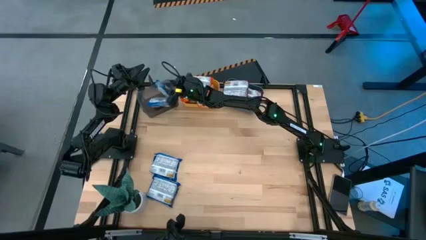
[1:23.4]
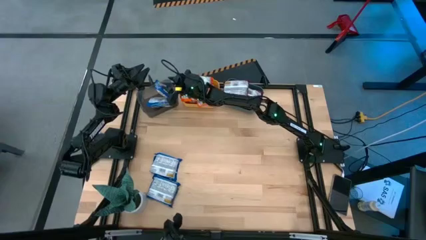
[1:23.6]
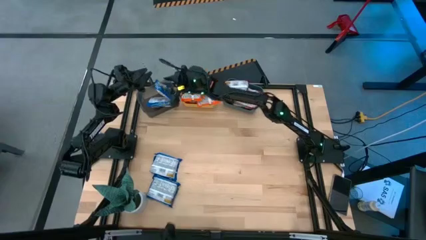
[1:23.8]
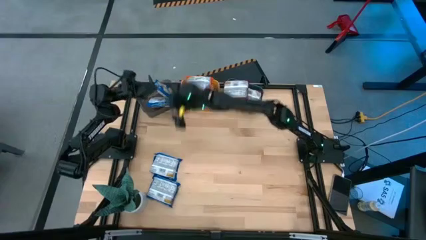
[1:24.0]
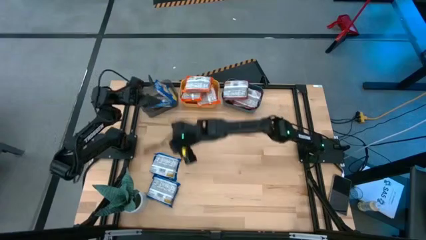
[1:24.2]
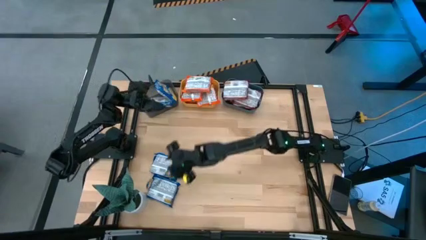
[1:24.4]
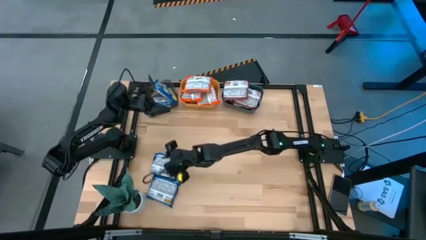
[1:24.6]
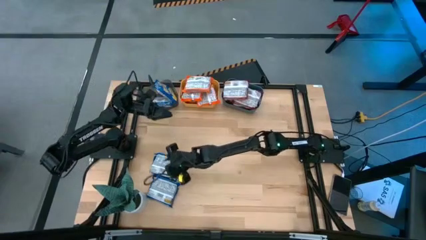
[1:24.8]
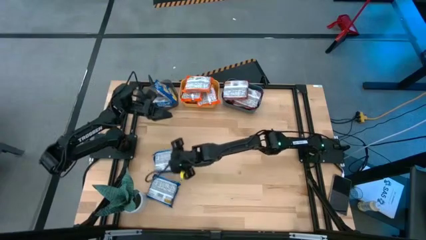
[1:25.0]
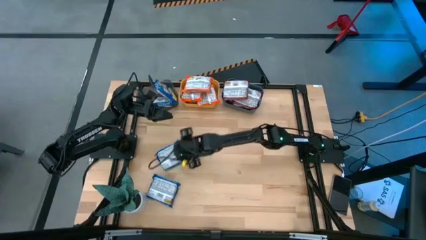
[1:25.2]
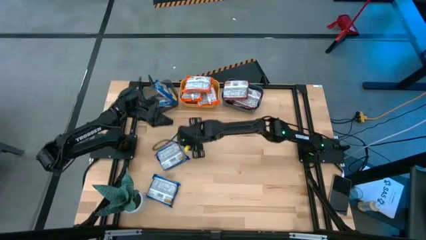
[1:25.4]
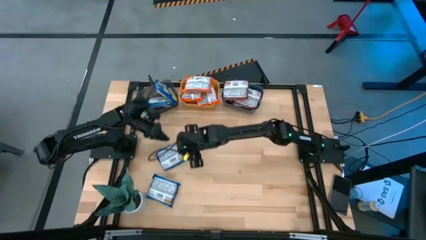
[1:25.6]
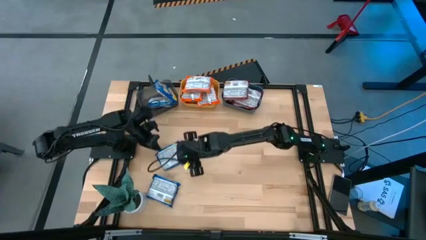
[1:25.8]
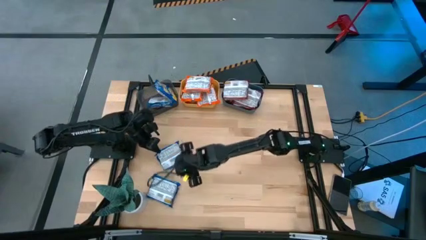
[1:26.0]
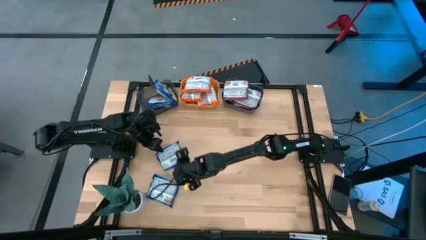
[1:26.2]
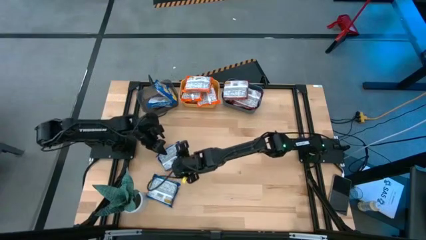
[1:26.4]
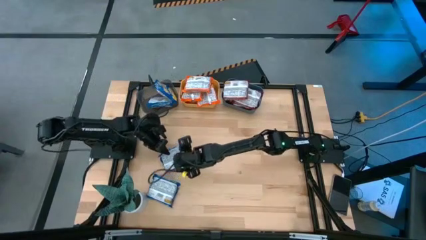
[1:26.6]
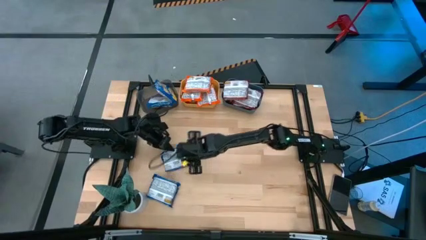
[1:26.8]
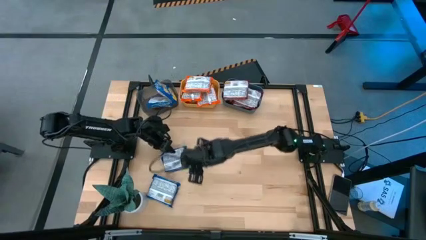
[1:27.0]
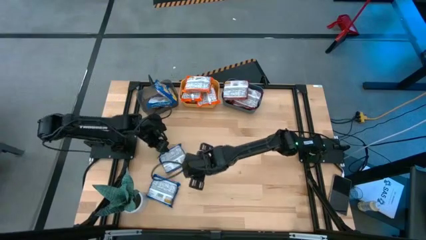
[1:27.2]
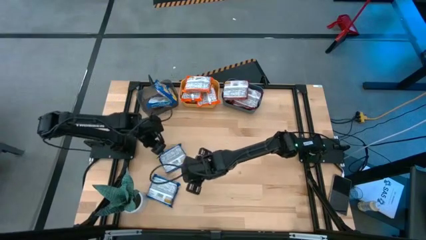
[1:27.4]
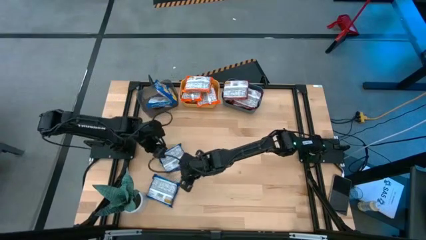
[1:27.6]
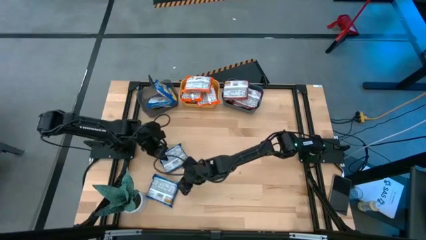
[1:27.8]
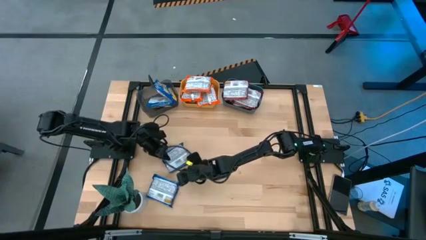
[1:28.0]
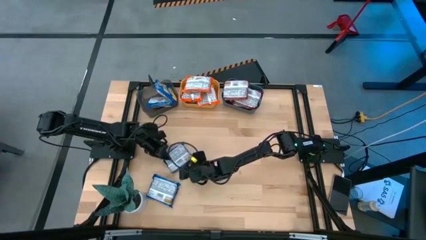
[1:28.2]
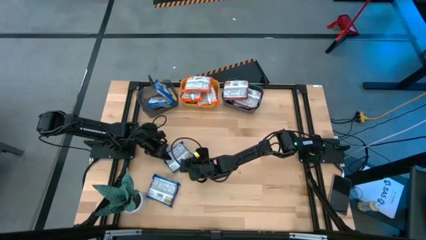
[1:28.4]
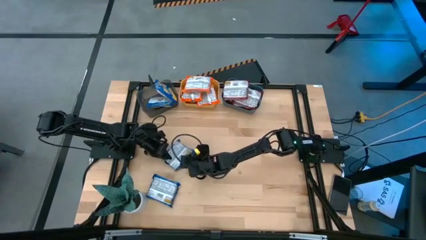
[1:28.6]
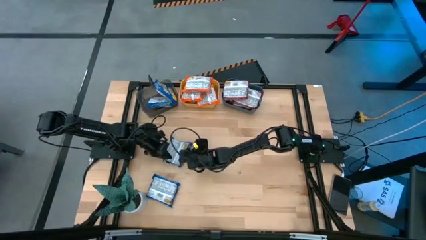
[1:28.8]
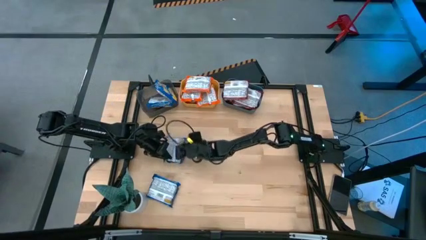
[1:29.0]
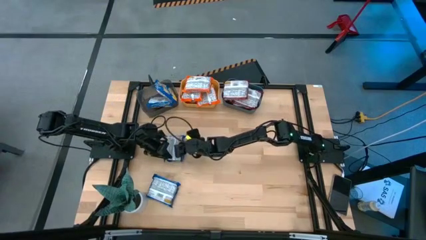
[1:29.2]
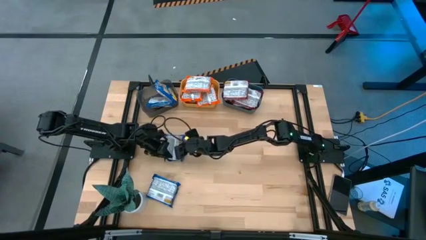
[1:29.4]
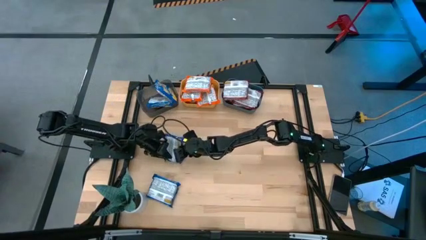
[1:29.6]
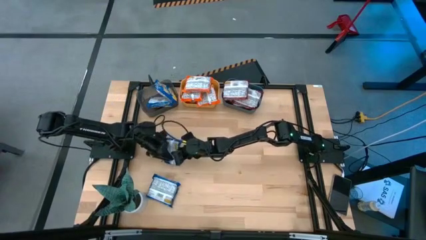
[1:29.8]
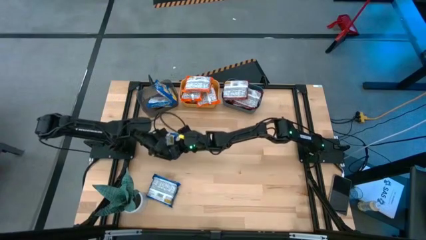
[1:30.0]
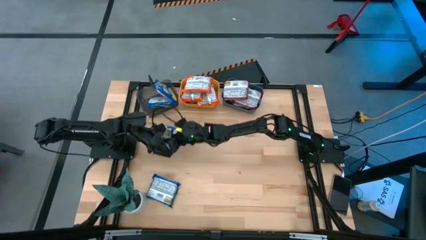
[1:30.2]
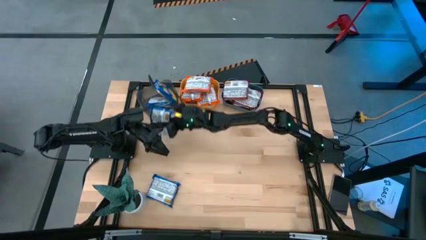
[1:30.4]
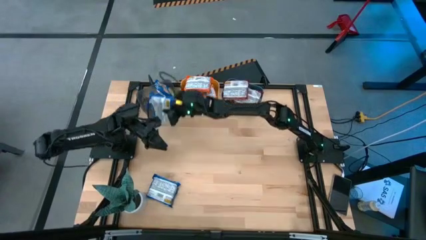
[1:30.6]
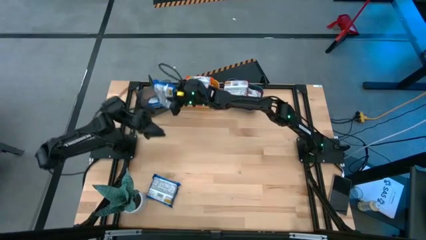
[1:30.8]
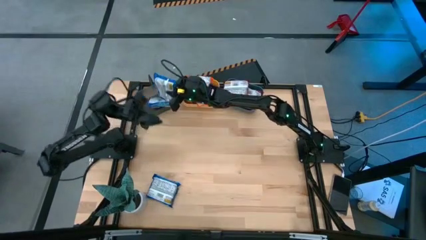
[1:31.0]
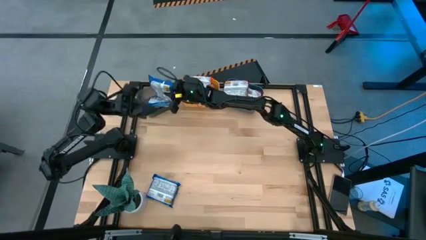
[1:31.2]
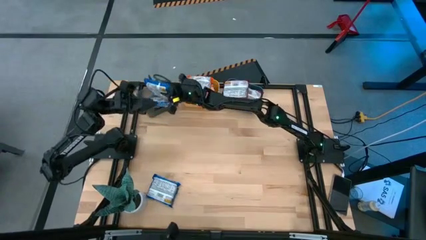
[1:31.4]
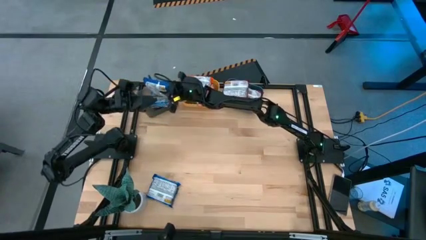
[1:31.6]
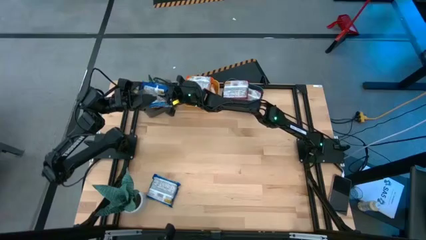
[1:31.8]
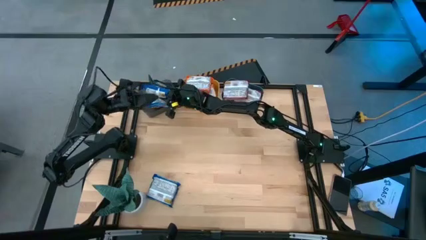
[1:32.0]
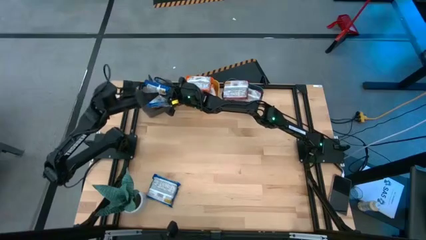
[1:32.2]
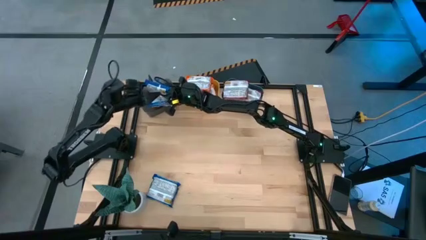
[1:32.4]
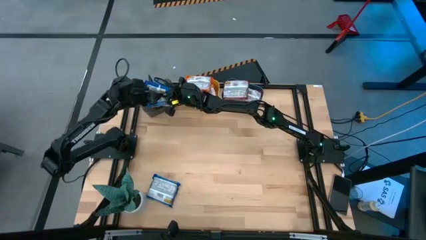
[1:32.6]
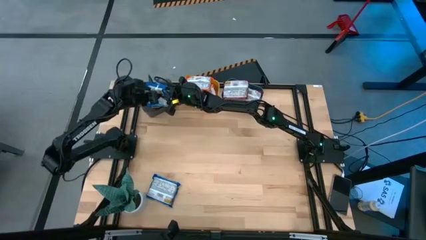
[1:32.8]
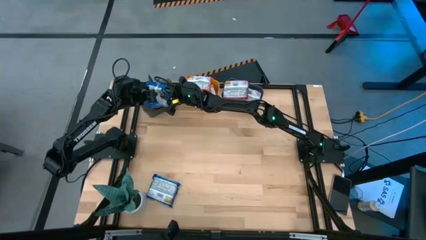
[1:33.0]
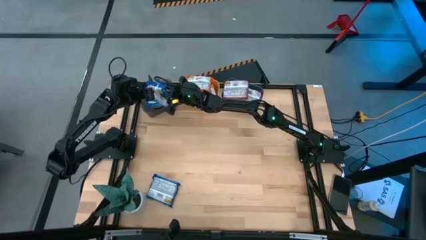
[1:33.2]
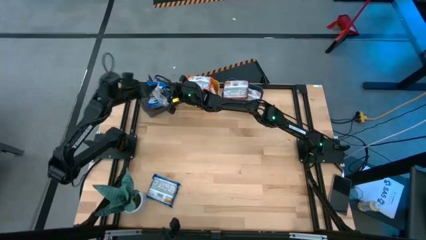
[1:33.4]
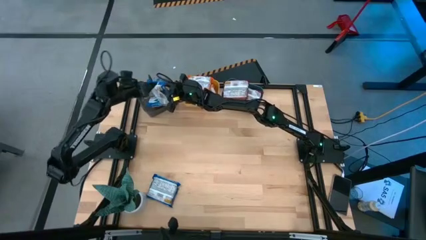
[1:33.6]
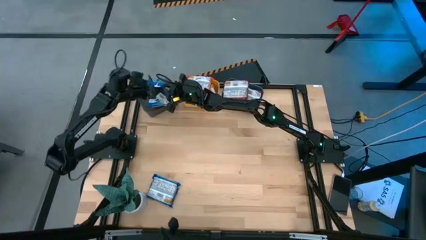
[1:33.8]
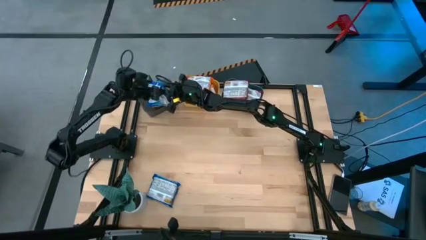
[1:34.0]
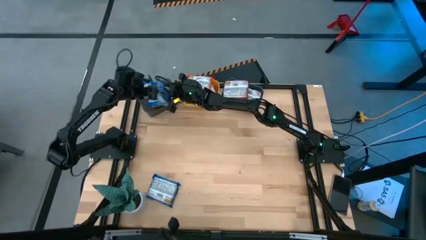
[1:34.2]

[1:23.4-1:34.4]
Task: Sort Maruchan noodles
Put the blue noodle pack into the black bin

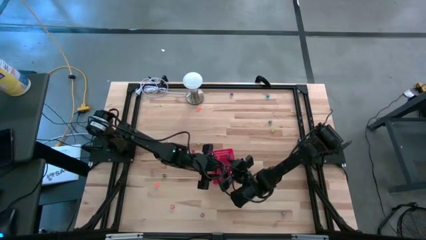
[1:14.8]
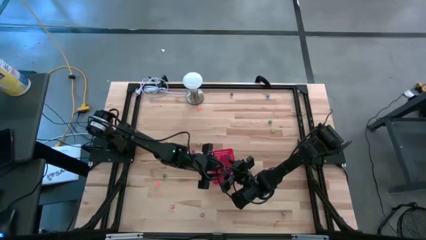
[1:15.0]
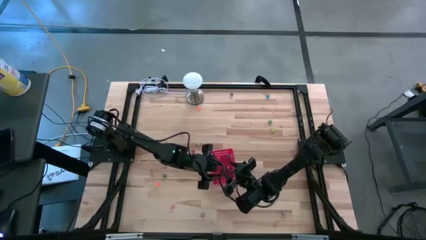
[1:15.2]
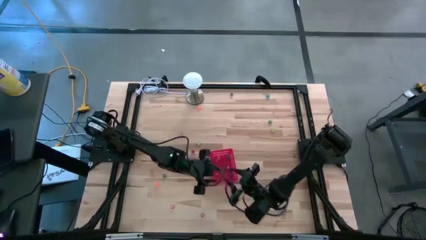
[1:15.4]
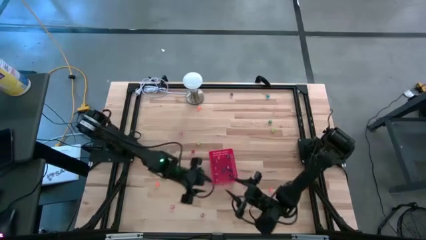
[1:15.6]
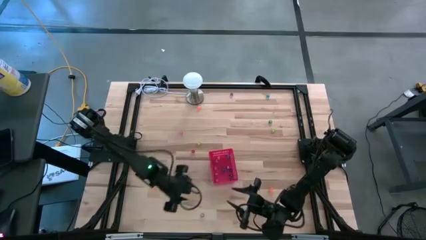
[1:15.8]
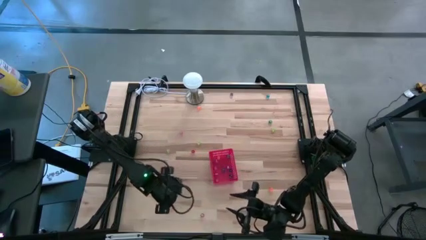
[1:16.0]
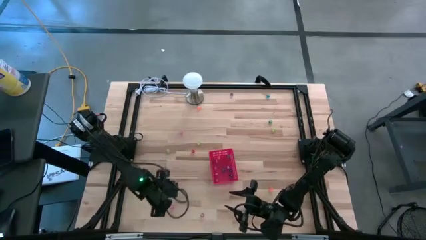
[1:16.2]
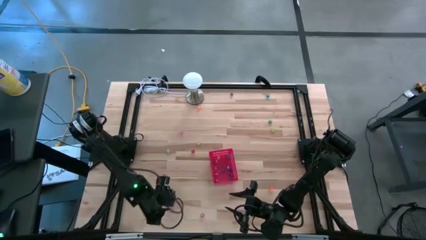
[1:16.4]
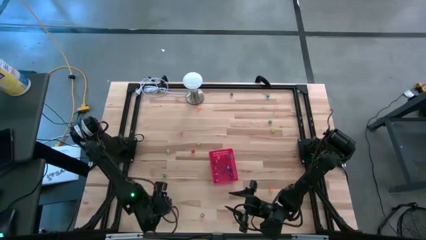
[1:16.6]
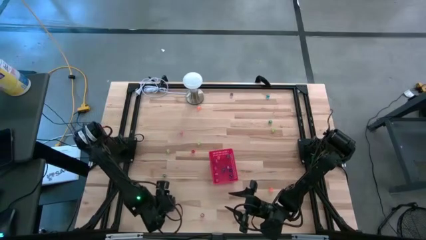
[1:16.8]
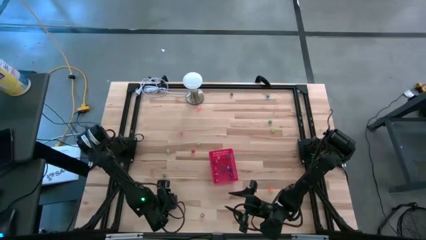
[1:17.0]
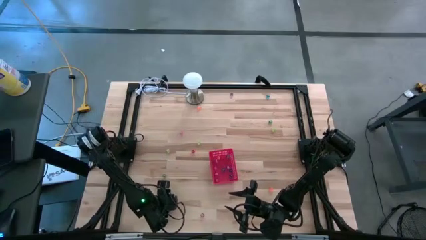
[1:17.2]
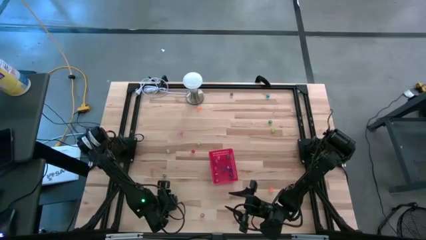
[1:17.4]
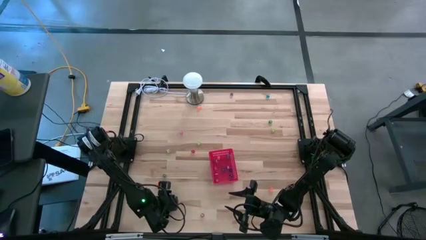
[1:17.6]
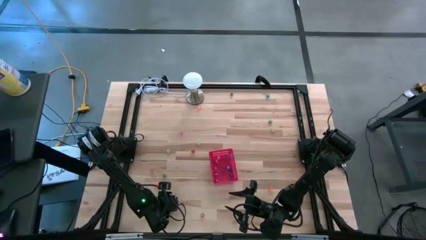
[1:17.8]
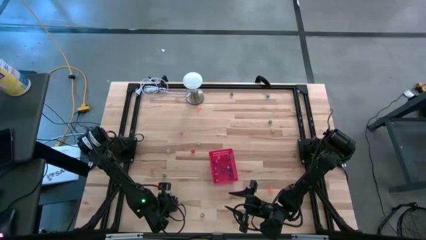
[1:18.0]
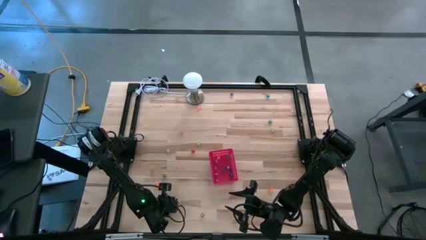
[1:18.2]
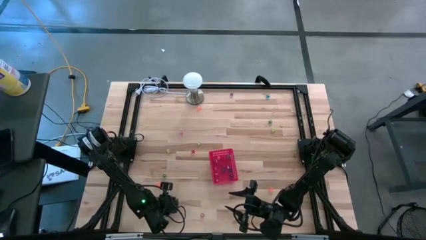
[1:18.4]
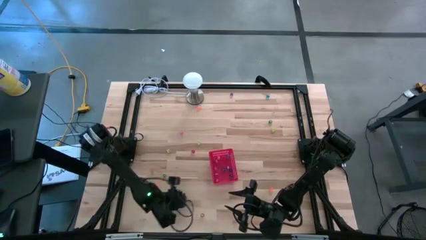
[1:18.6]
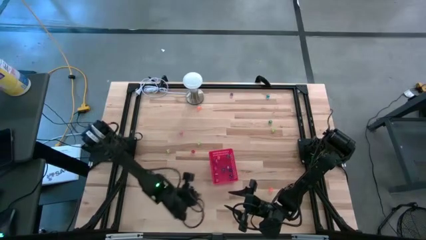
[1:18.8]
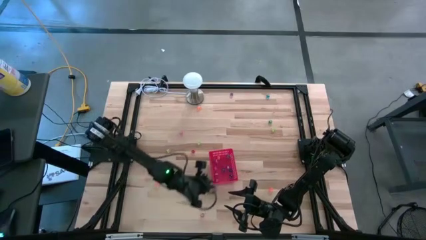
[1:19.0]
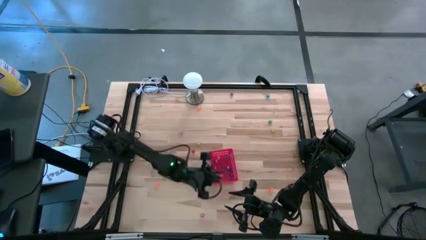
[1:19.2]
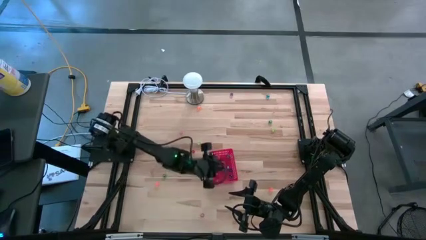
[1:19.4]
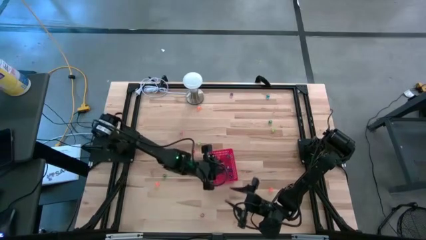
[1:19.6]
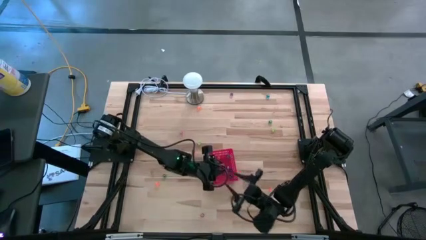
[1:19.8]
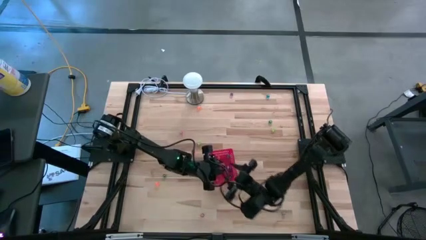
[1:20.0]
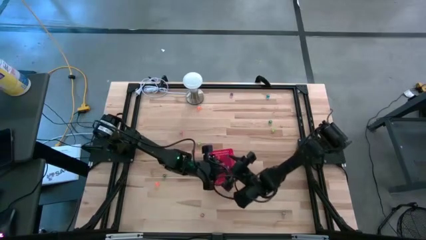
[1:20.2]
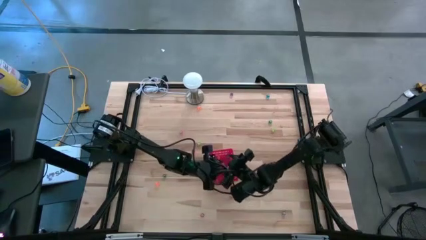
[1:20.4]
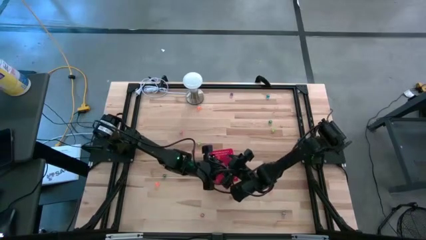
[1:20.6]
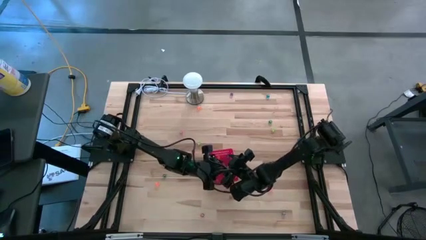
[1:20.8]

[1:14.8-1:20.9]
Task: Pick & Place Dice
Put the pink die into the red basket
